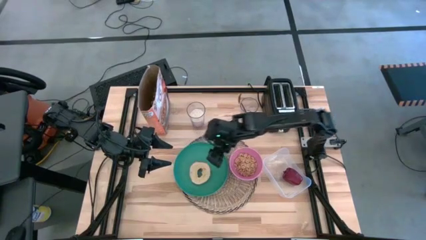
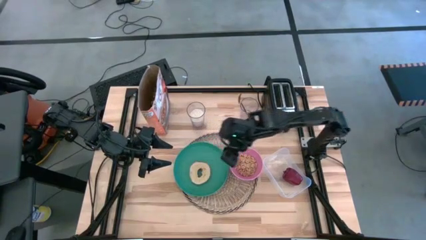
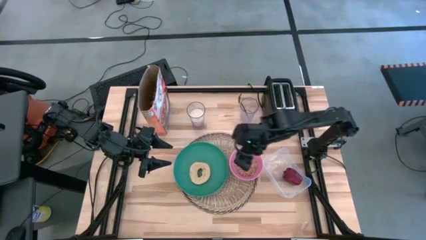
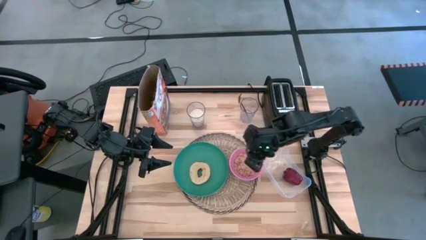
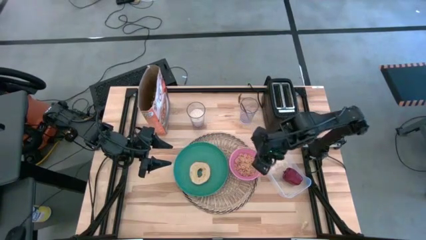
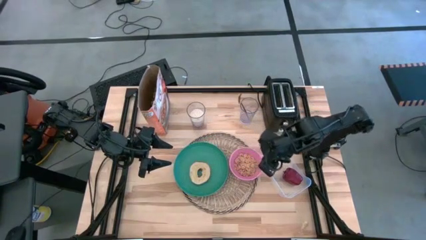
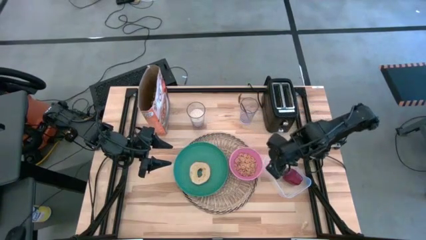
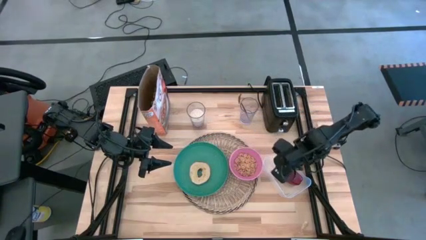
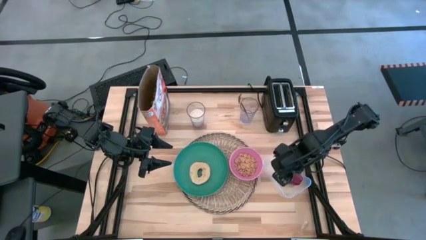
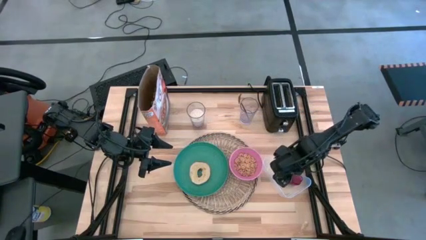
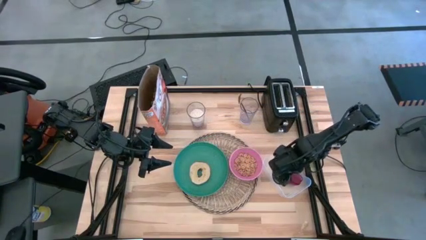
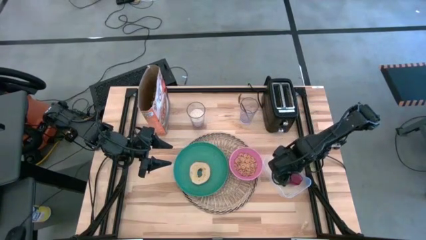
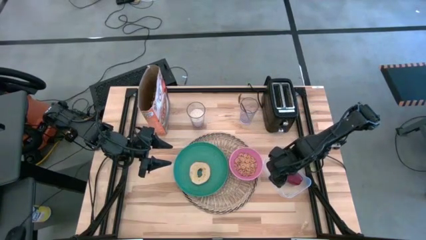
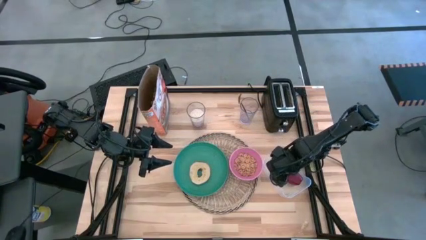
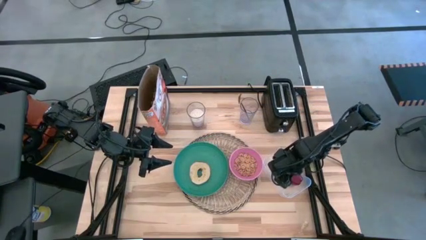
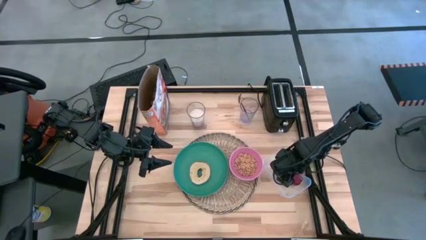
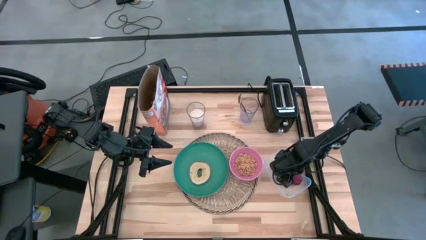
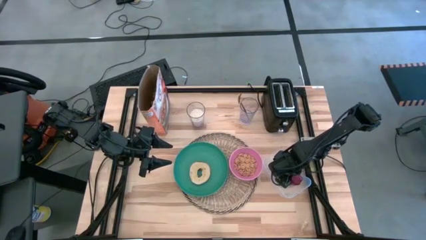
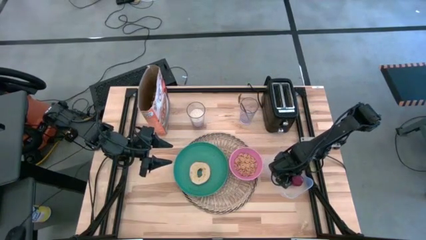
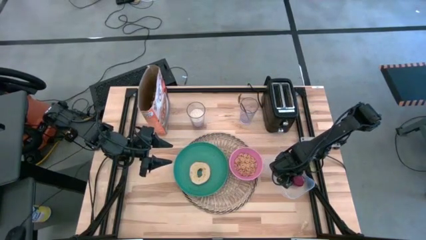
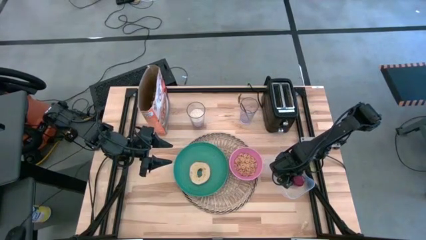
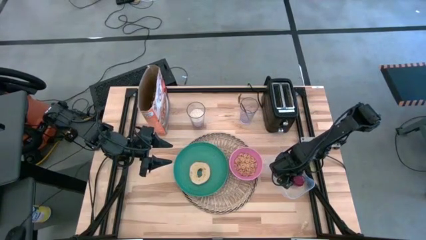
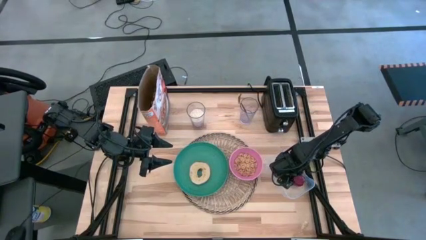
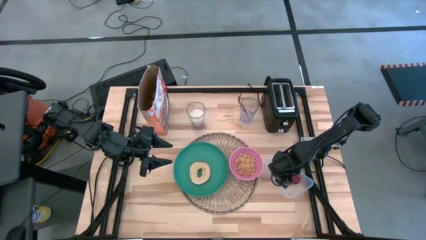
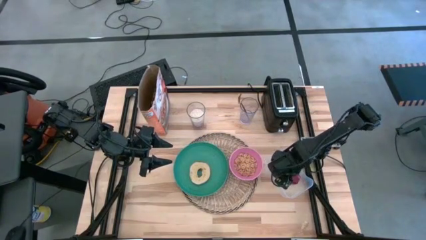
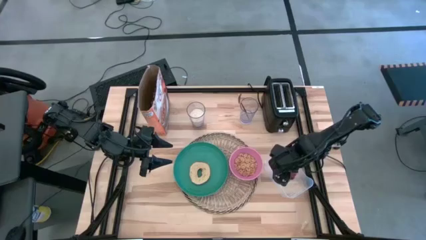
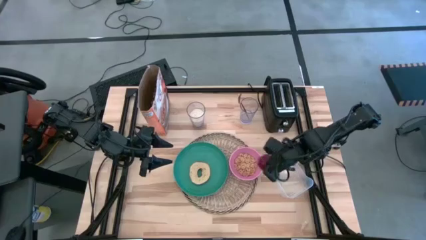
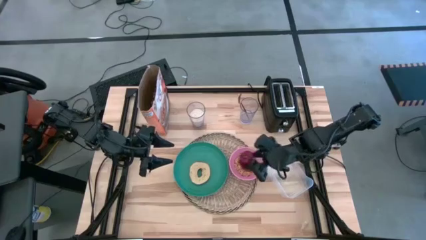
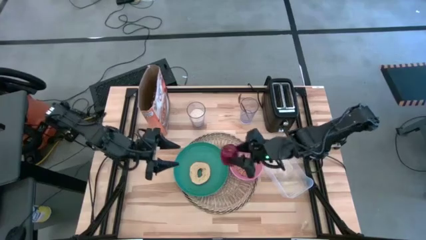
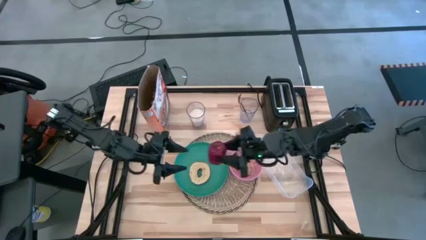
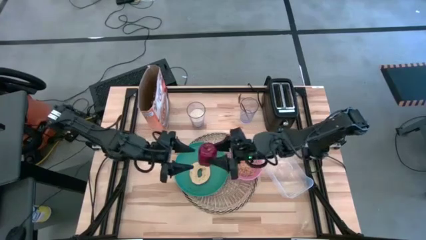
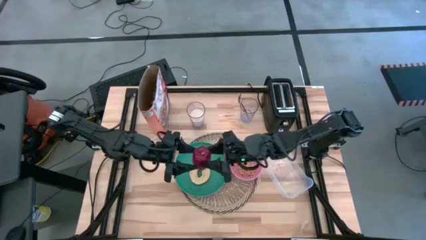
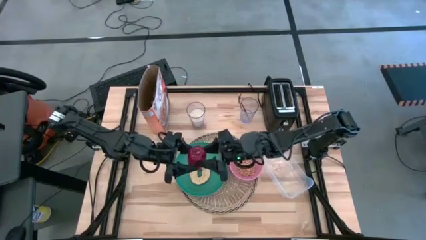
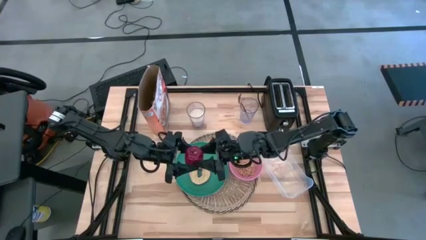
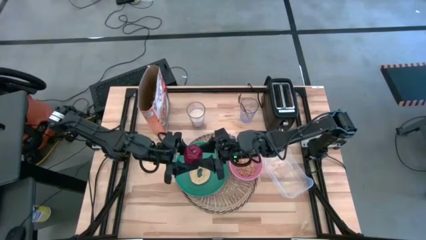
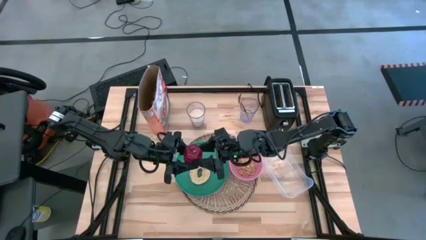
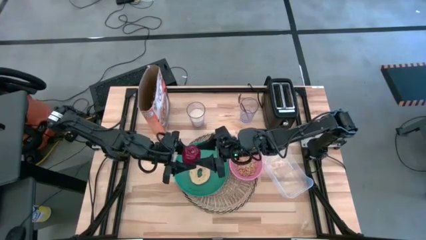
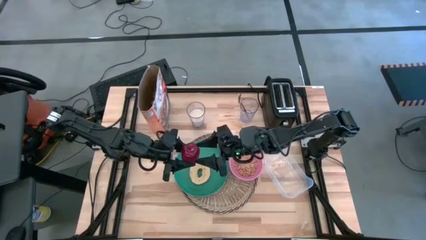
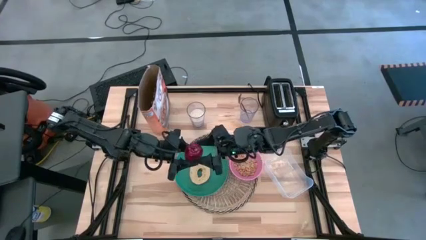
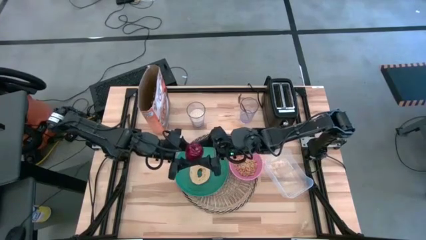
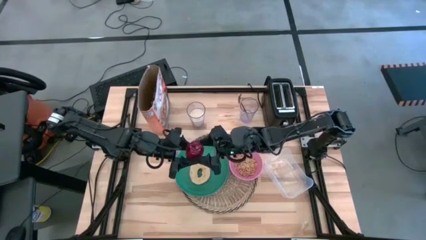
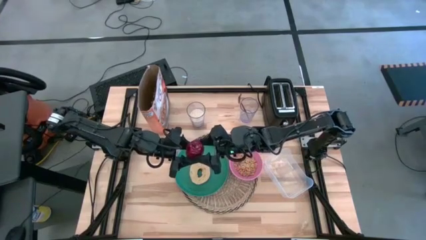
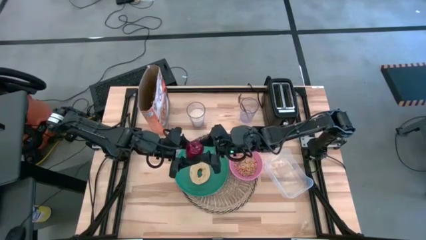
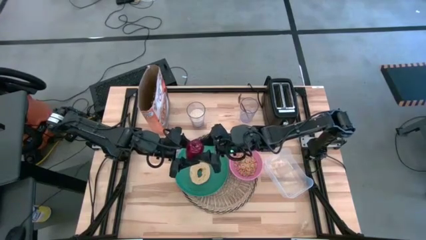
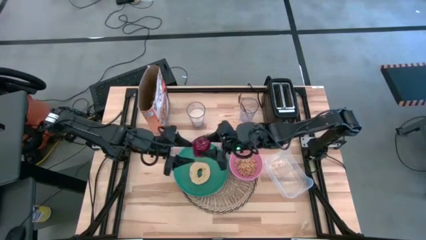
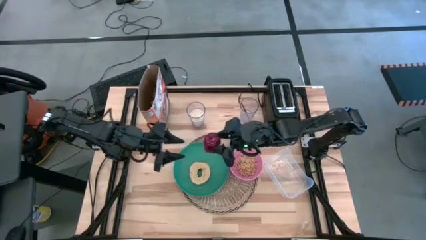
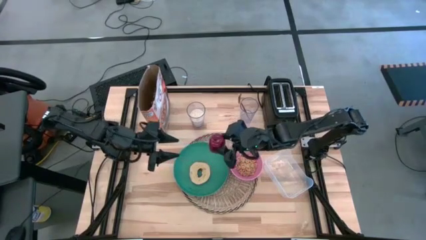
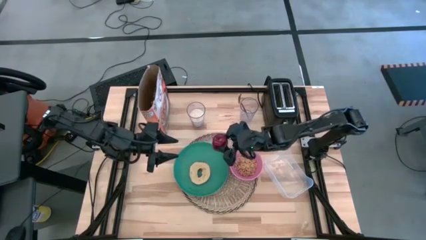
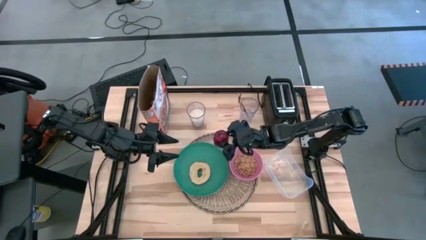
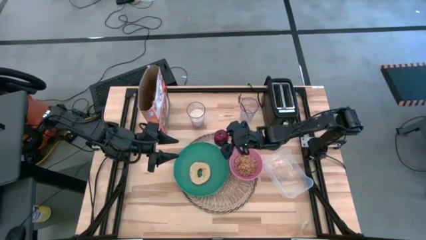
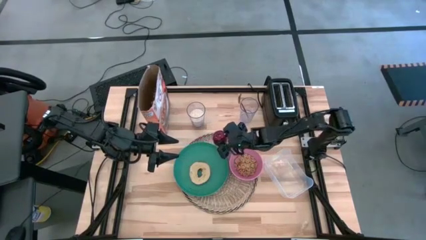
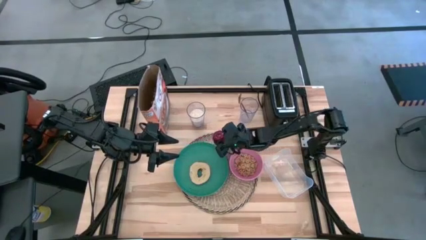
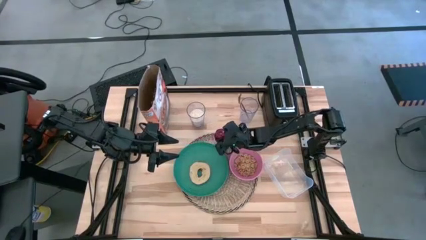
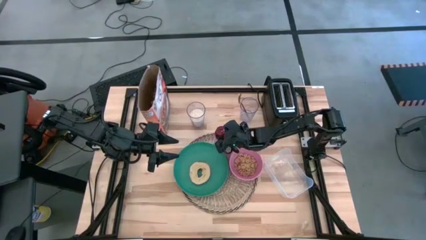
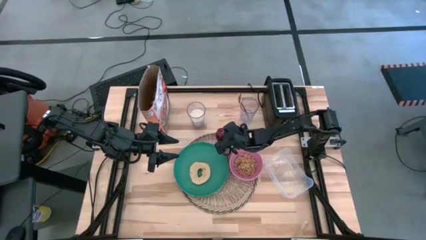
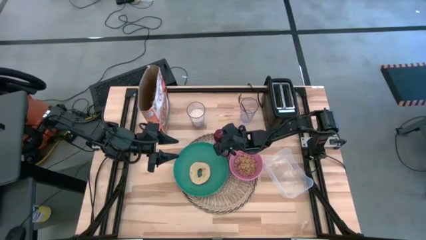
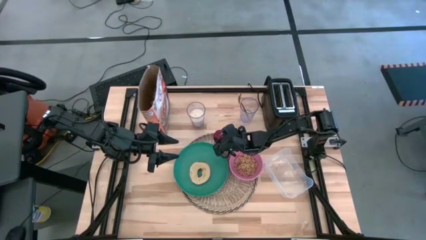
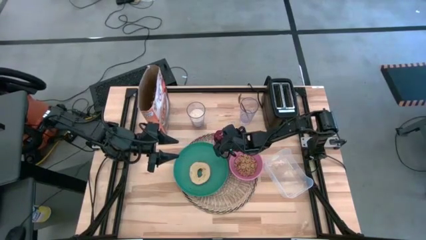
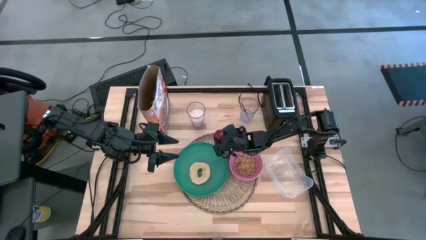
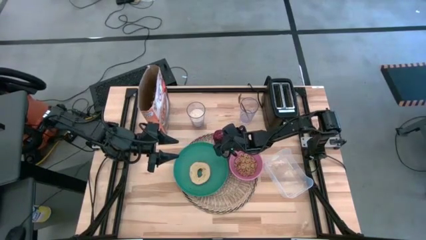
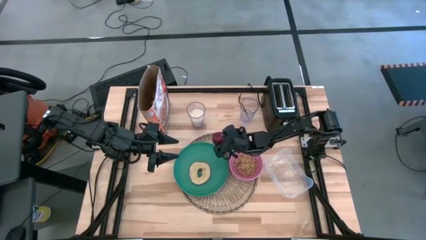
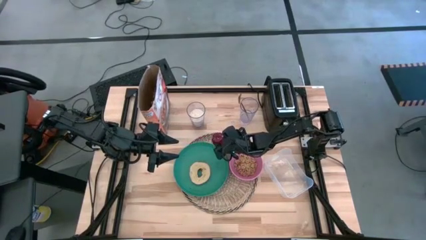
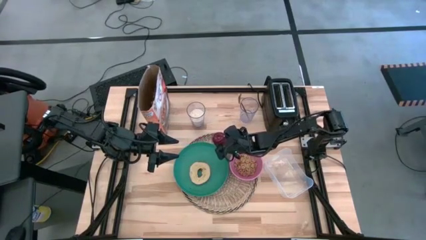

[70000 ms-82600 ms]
Task: Arrange a breakfast setting
Put the apple on the brown placemat

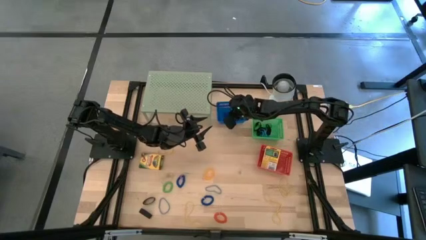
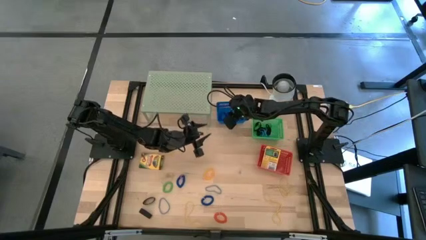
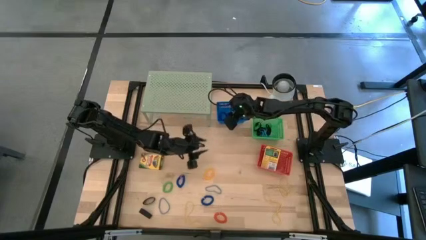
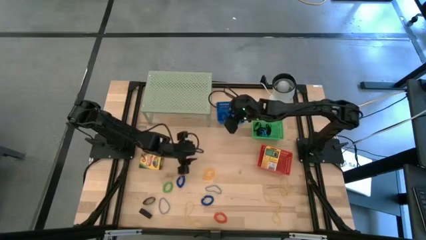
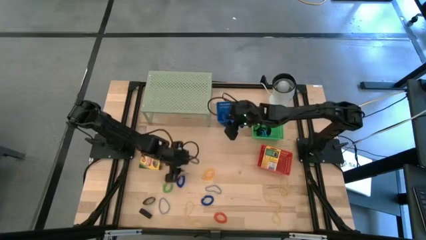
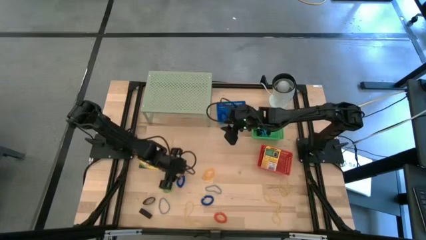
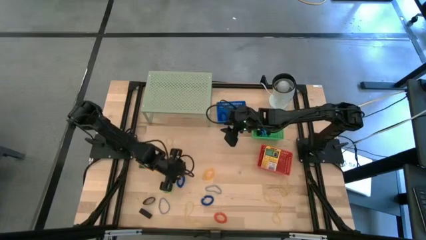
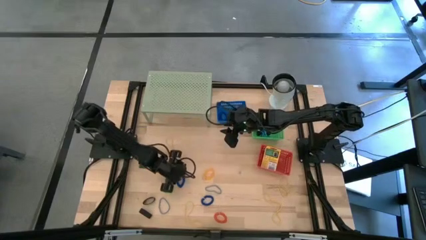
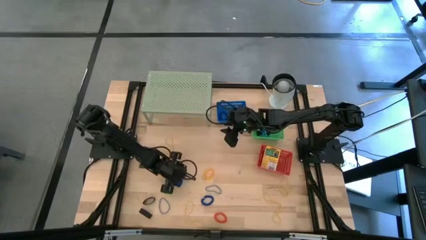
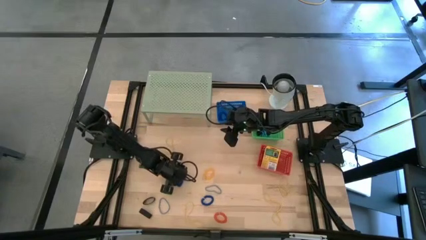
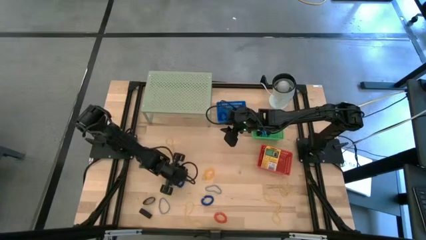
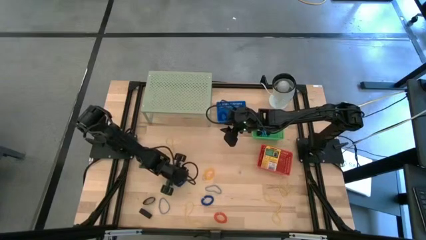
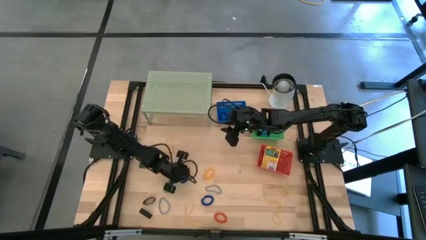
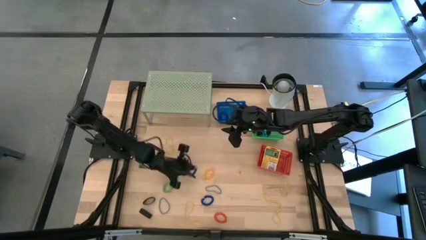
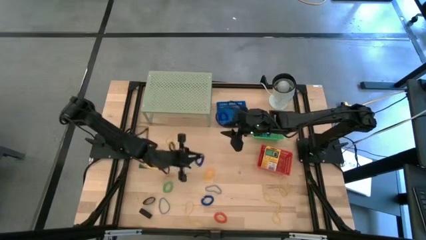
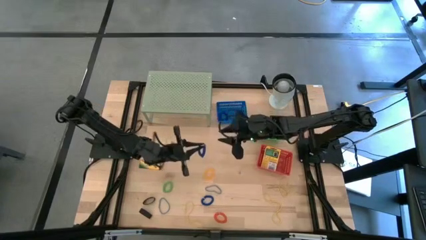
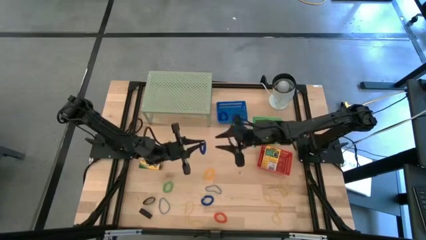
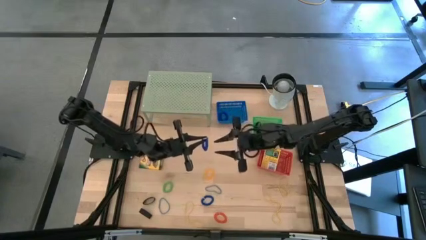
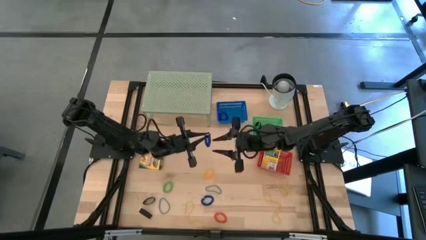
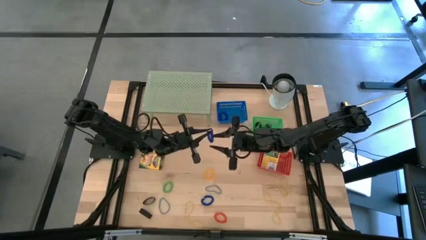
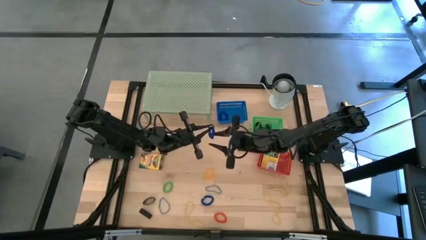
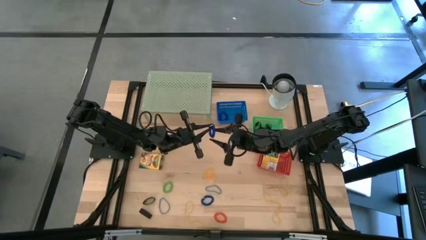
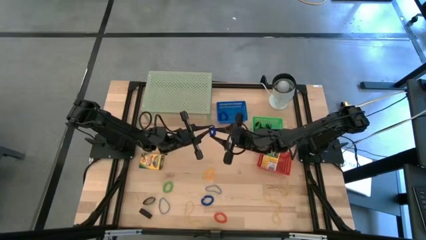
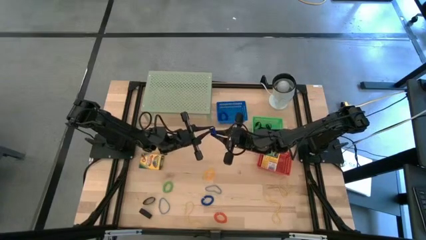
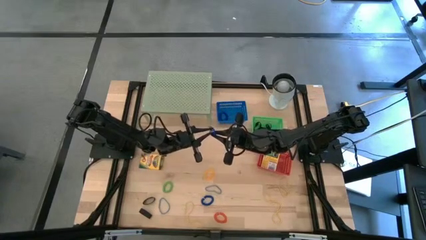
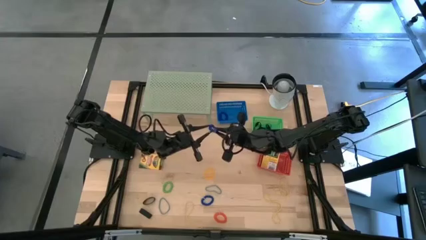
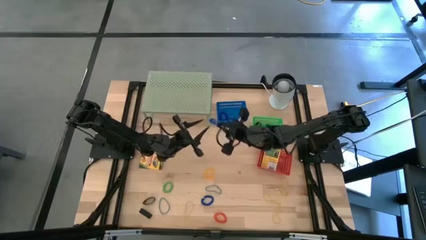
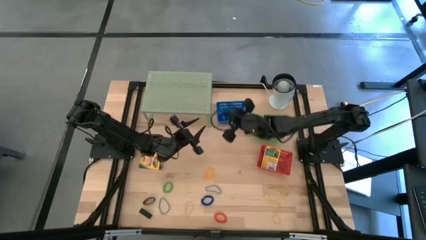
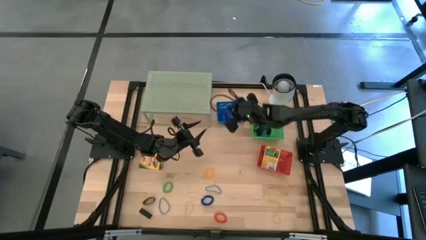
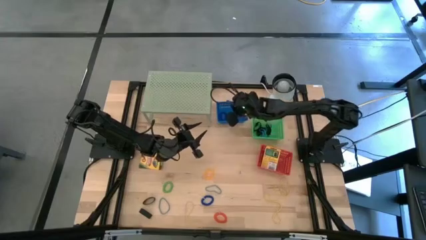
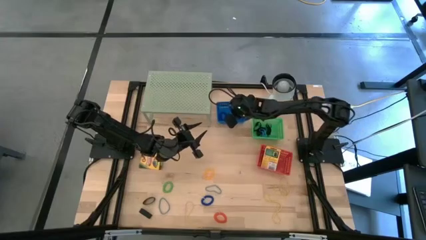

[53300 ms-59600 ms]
Task: Pick & Place Office Desk Supplies
Put the blue spring keychain into the blue bin
